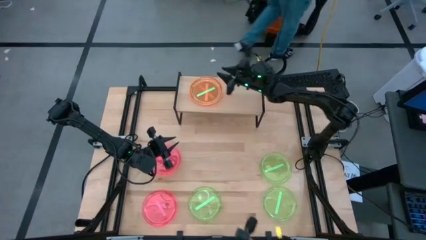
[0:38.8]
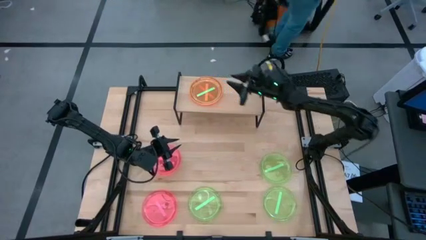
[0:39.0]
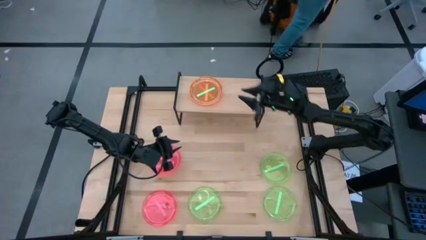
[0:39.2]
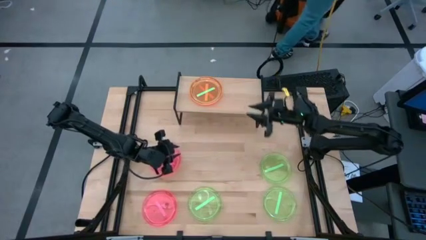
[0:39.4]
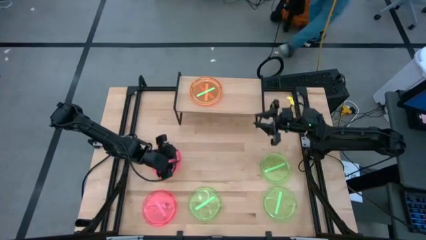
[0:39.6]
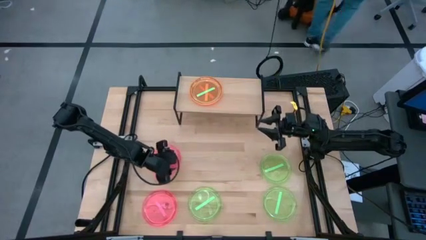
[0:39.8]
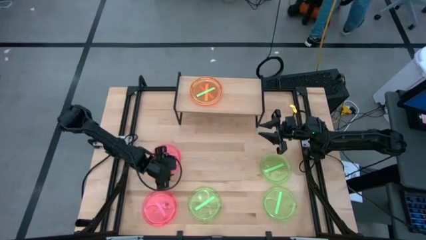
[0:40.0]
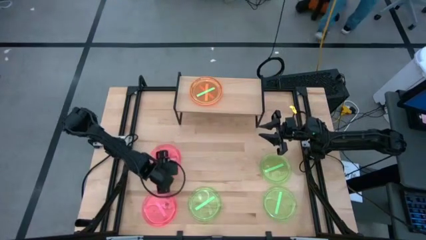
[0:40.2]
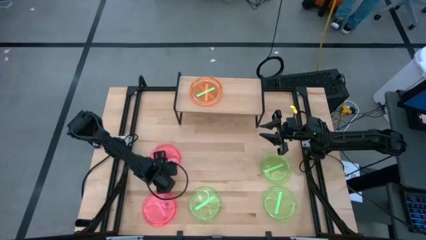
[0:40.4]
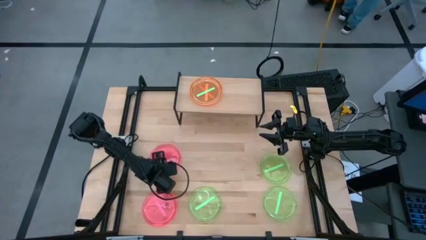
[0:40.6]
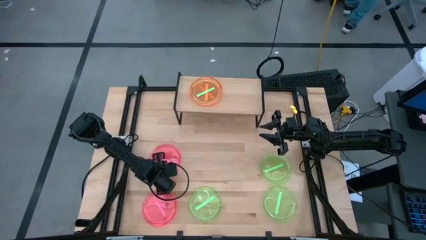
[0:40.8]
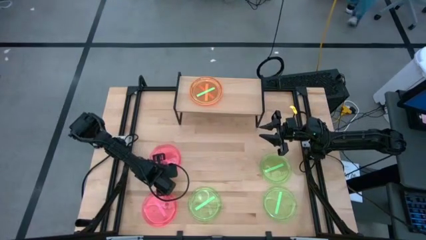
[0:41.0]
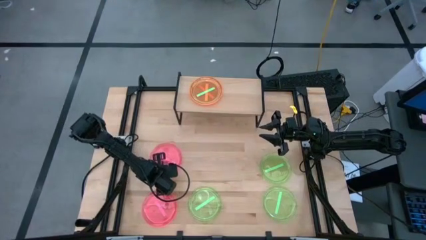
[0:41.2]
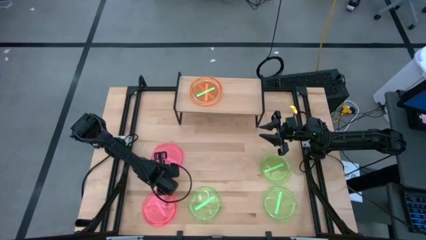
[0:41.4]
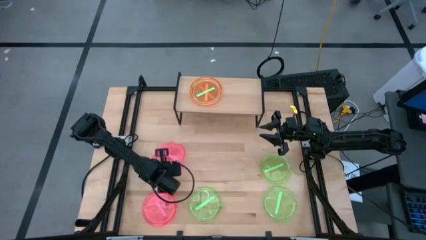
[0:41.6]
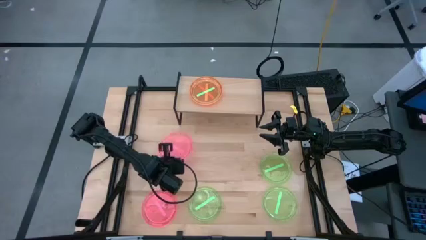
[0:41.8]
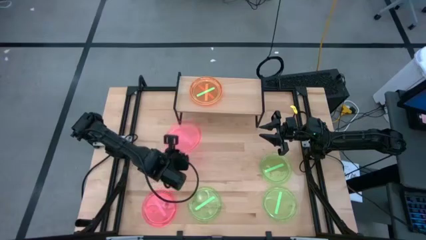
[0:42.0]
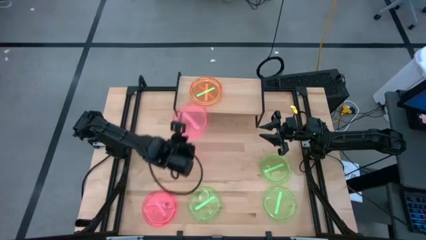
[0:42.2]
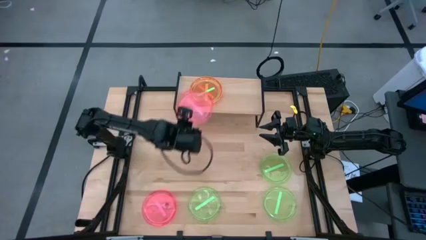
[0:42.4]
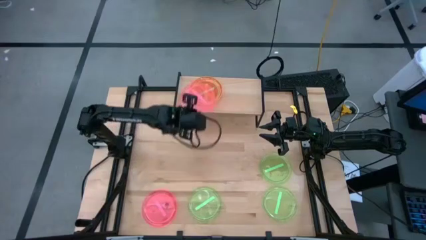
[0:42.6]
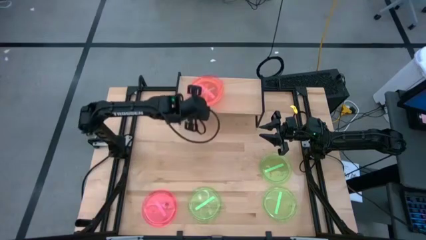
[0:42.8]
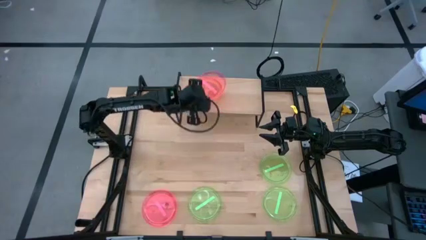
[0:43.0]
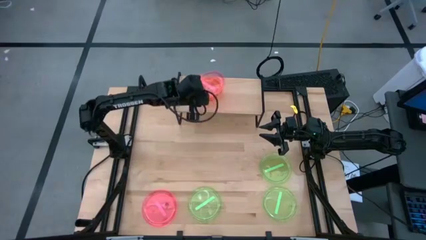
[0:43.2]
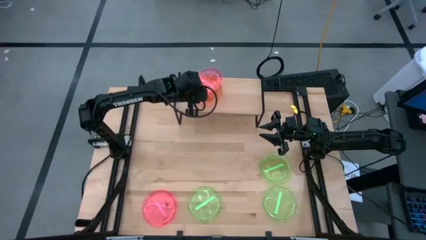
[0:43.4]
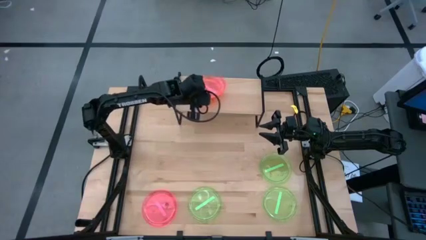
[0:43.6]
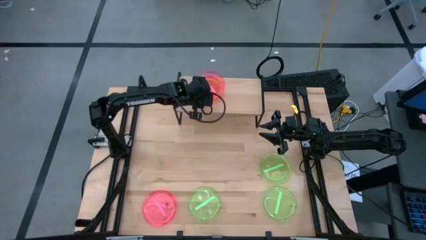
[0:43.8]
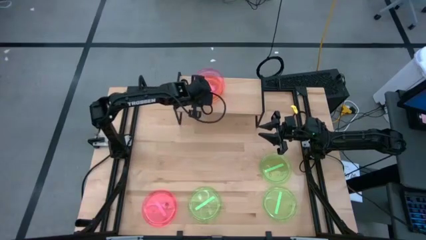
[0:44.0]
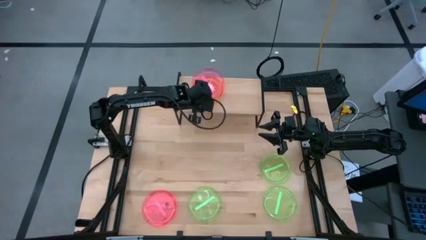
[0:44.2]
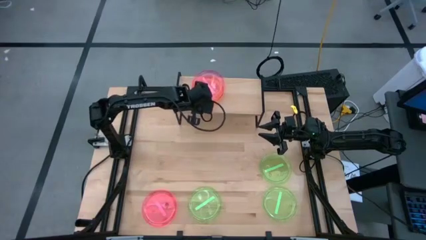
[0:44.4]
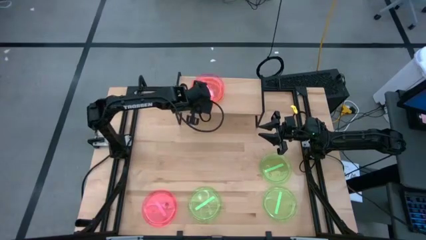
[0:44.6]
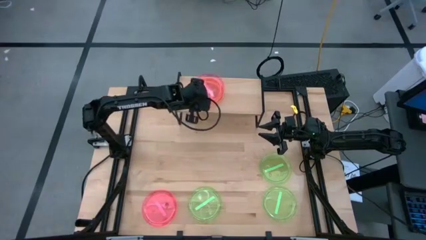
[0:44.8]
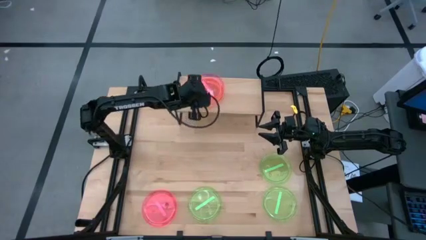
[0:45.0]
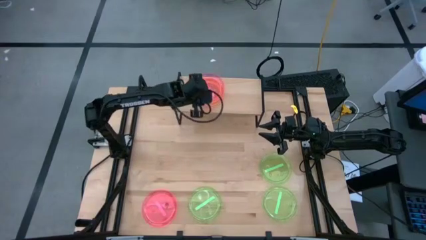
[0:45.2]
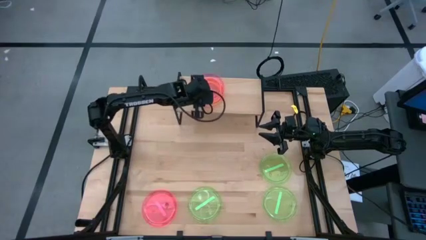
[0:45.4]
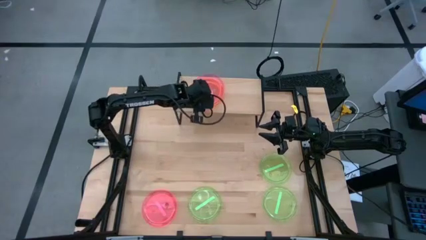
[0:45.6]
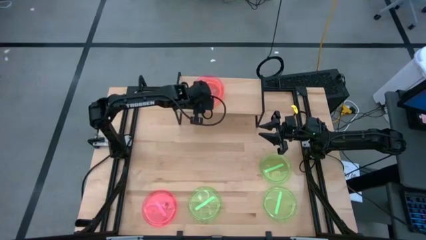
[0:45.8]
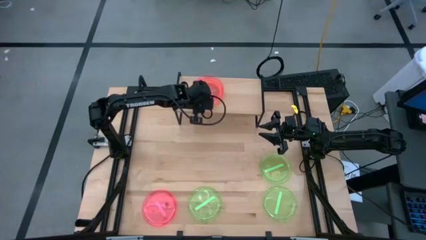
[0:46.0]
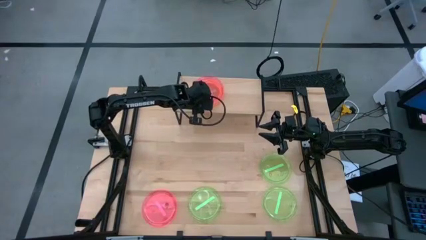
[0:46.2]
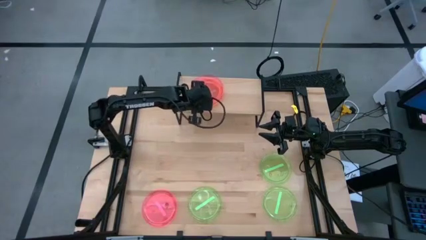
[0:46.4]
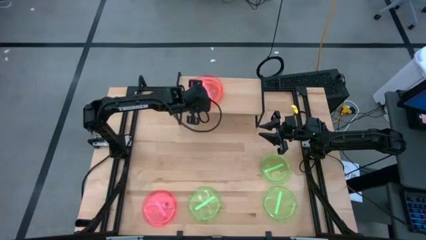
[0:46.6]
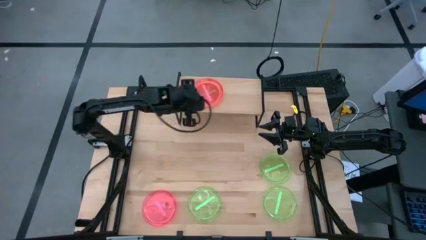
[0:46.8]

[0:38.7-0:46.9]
Task: Place and stack plates onto a shelf
Stack the top red plate on top of the green plate

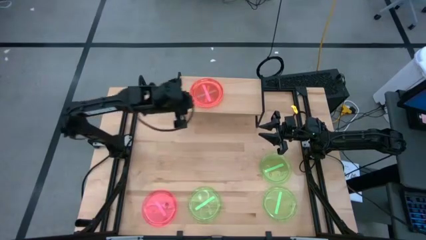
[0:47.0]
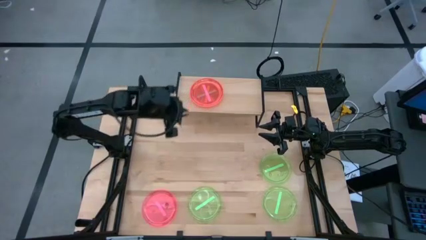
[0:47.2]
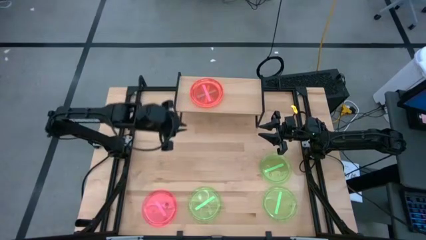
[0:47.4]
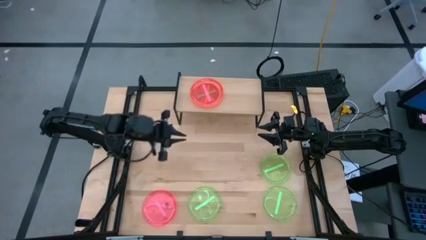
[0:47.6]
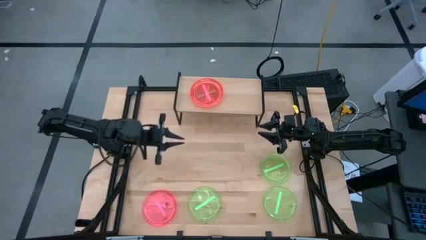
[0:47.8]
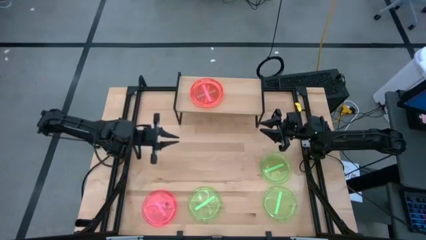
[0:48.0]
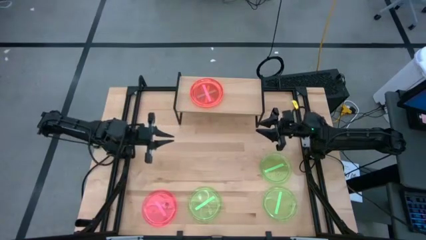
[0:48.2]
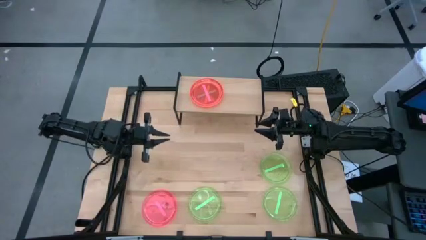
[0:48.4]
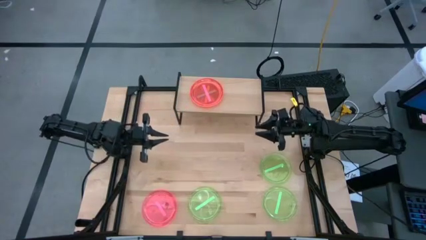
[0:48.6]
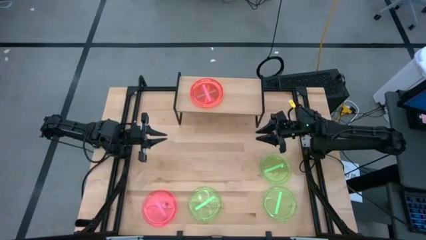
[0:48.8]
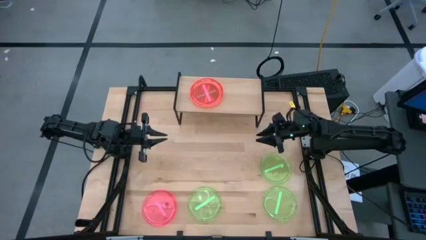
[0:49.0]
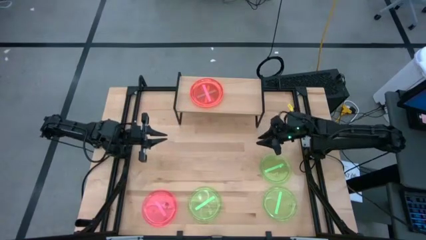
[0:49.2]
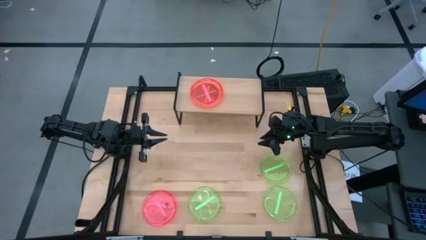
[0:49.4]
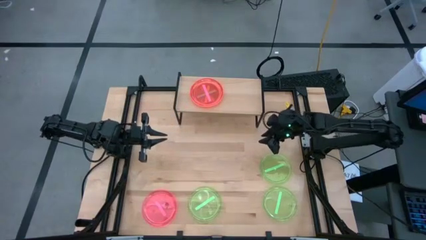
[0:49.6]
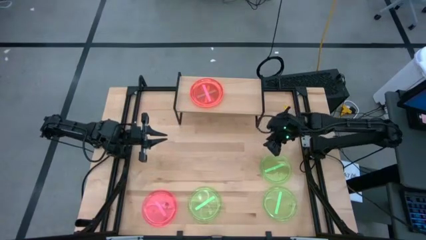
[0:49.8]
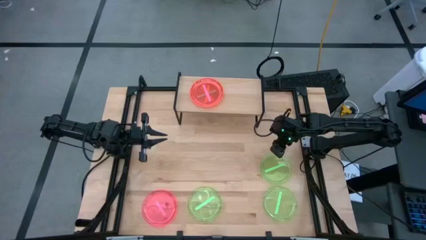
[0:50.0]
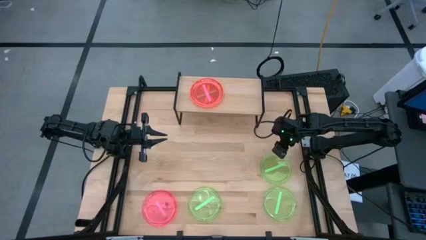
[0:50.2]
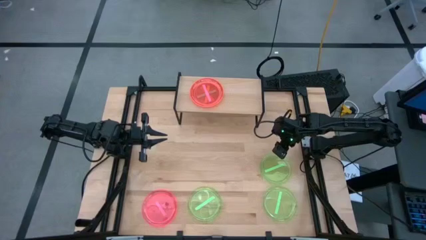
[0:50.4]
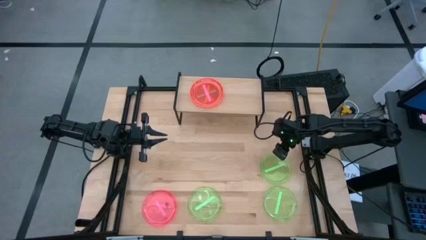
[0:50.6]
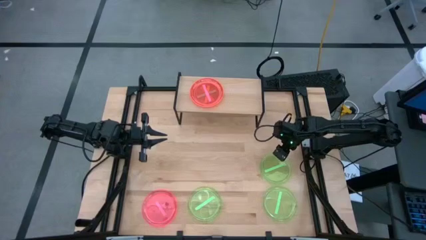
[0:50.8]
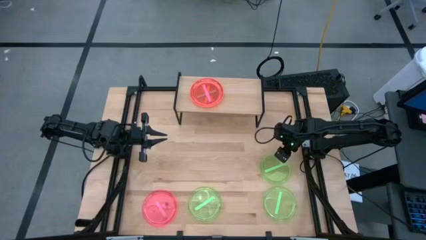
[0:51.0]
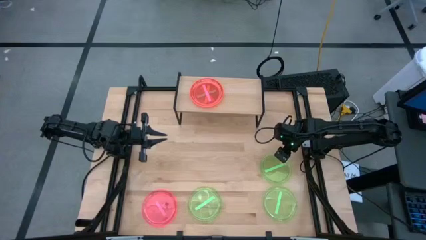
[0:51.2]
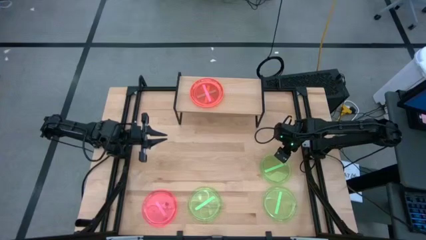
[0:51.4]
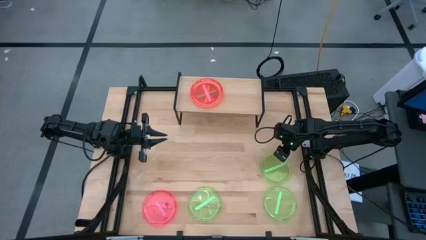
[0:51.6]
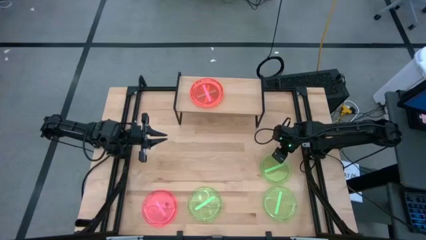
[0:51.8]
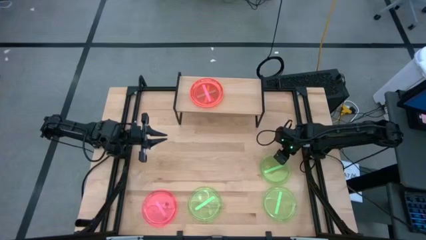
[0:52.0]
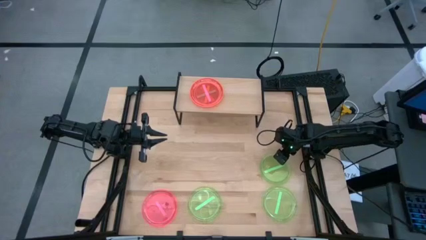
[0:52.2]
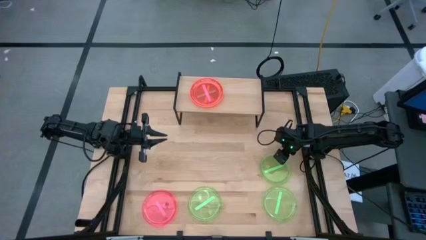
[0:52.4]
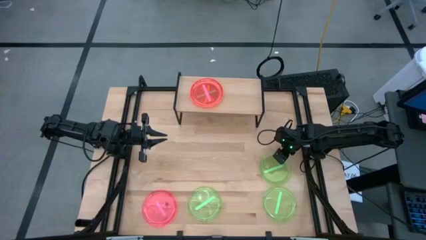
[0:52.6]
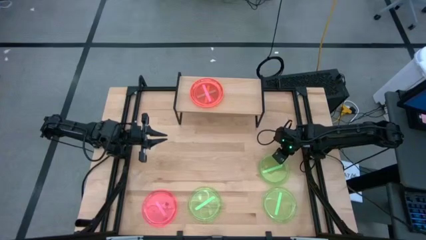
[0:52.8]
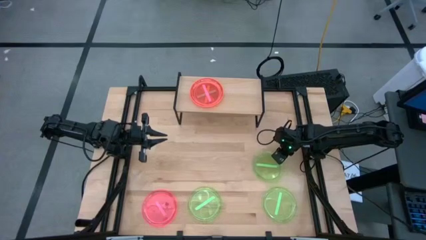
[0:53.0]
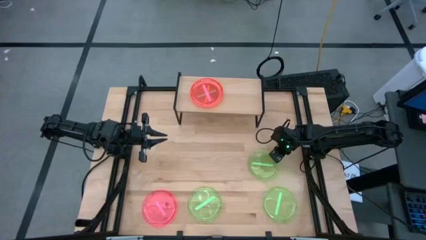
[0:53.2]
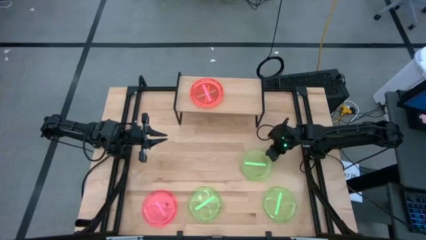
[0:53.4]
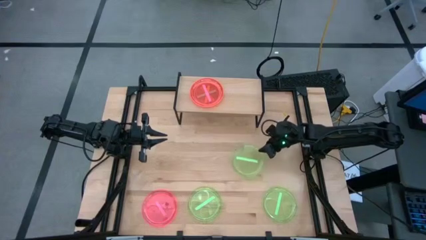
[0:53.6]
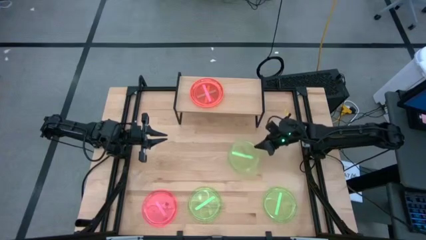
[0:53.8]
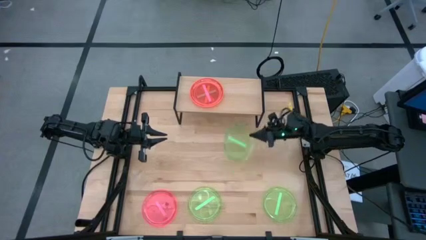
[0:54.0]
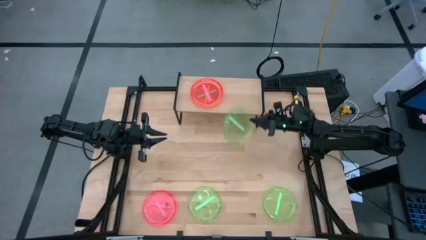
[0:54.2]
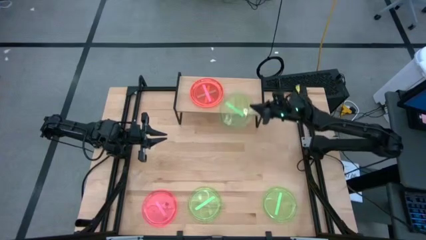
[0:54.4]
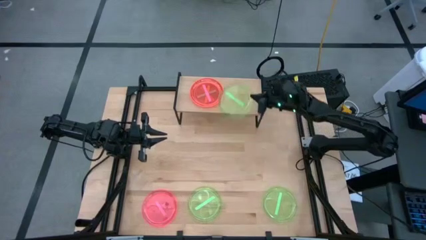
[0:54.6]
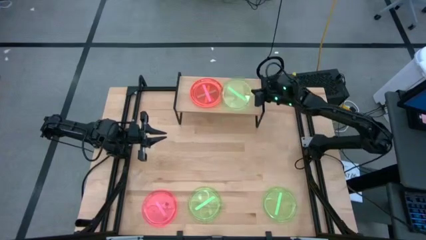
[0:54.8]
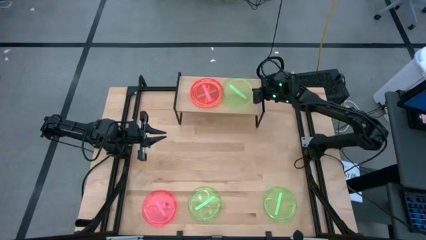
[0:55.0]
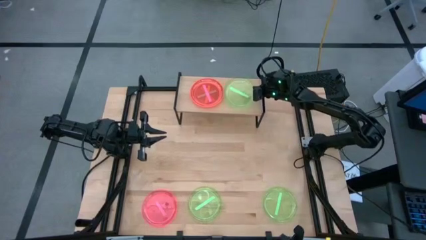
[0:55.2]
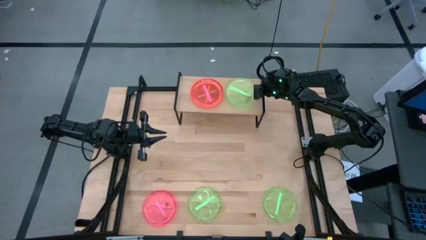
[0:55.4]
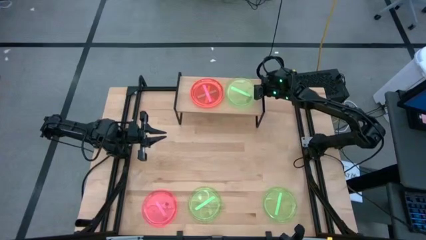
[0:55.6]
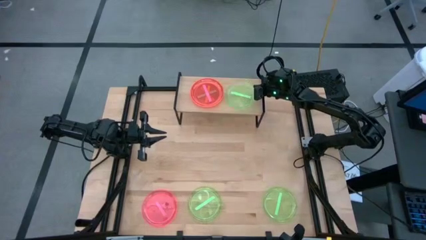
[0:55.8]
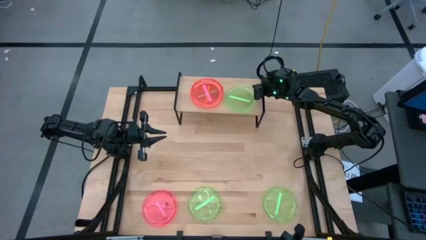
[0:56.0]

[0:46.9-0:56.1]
Put the top right green plate on the shelf
